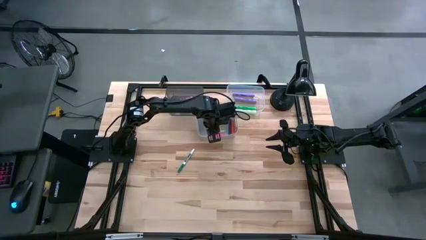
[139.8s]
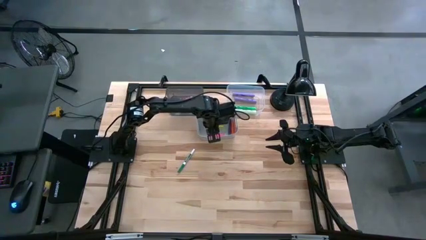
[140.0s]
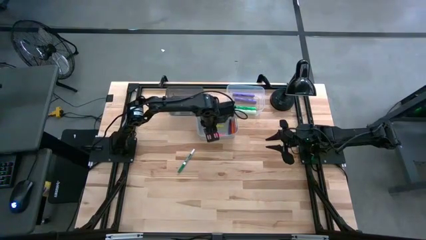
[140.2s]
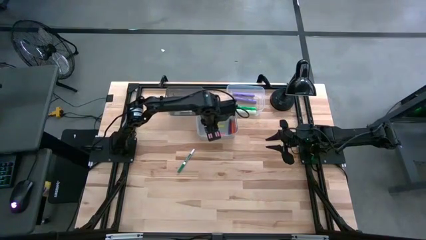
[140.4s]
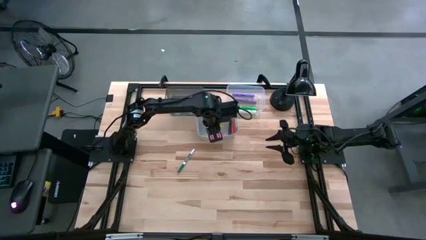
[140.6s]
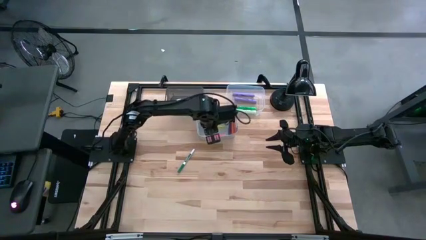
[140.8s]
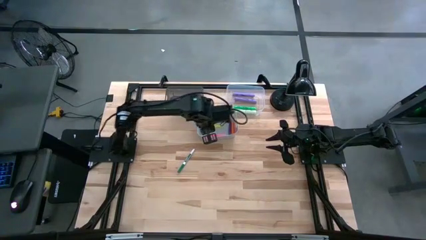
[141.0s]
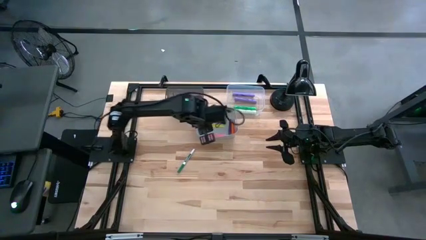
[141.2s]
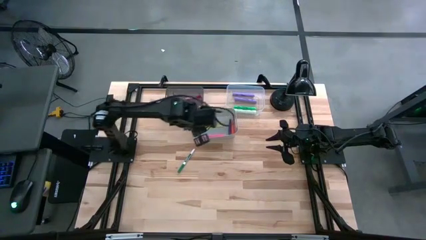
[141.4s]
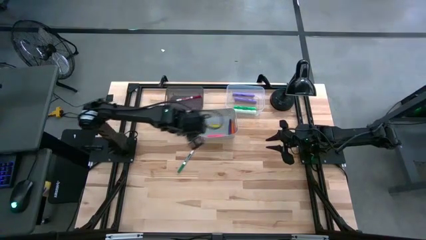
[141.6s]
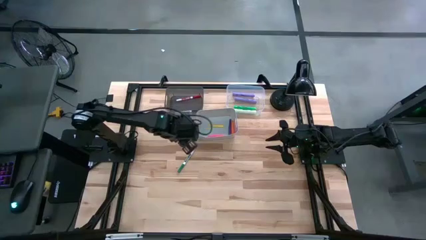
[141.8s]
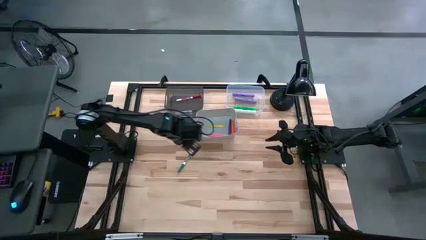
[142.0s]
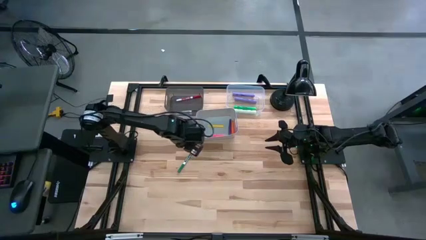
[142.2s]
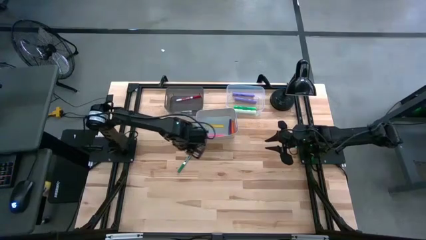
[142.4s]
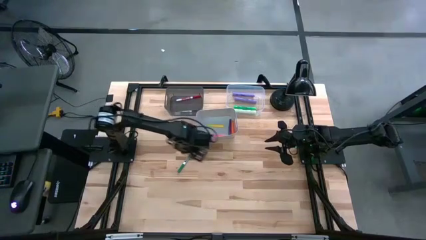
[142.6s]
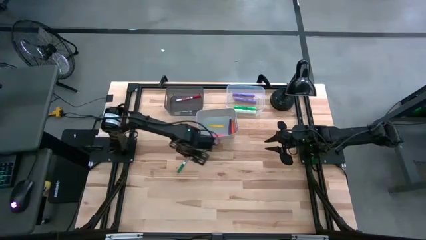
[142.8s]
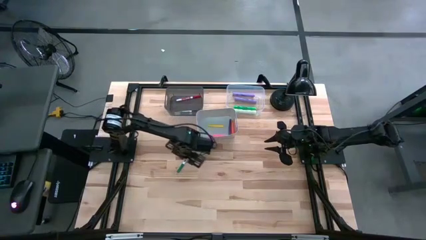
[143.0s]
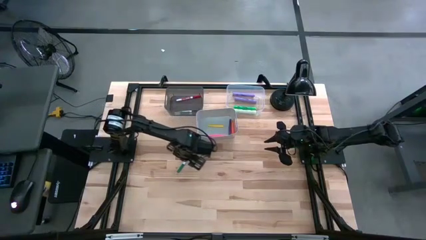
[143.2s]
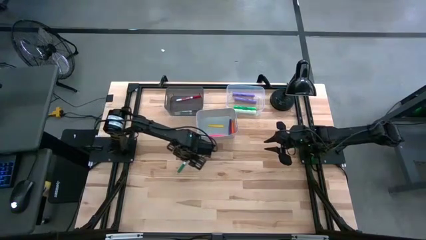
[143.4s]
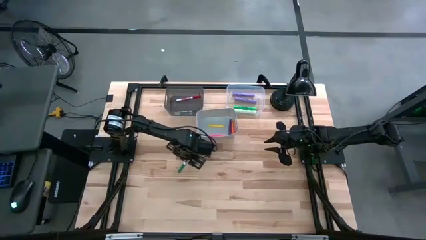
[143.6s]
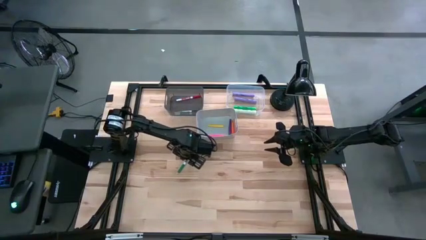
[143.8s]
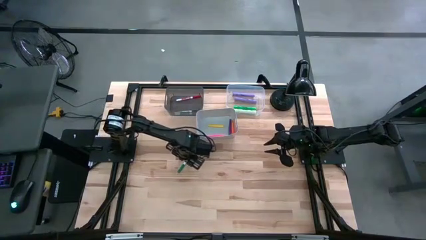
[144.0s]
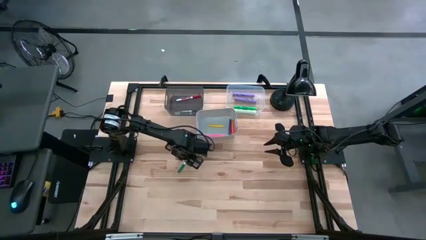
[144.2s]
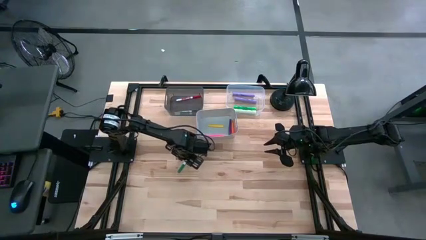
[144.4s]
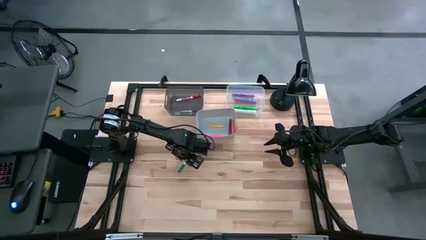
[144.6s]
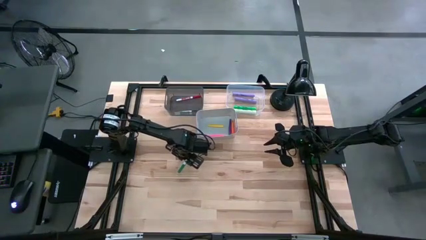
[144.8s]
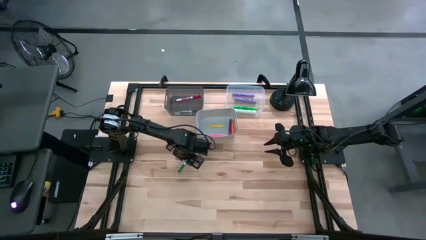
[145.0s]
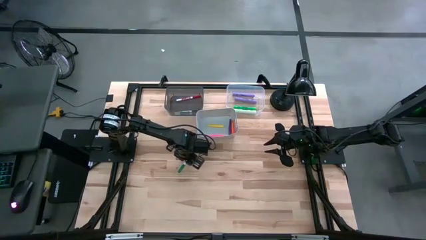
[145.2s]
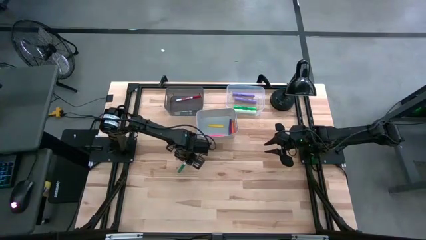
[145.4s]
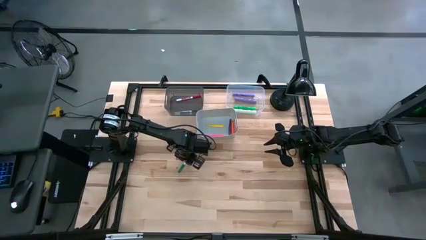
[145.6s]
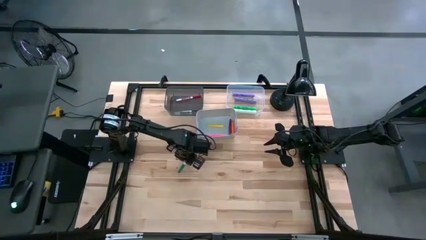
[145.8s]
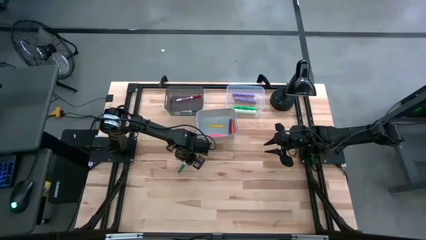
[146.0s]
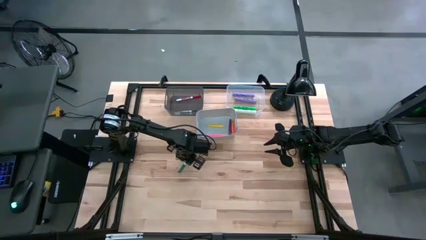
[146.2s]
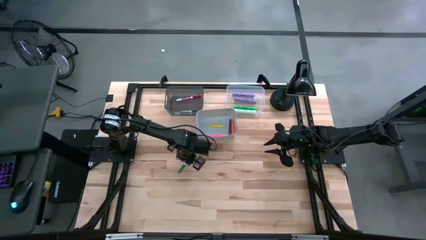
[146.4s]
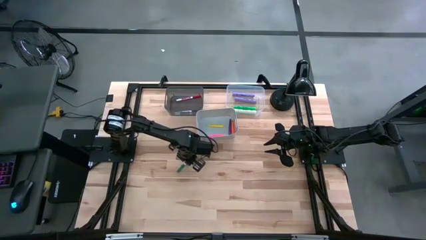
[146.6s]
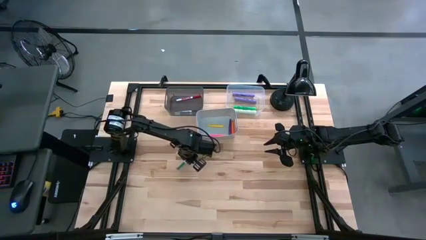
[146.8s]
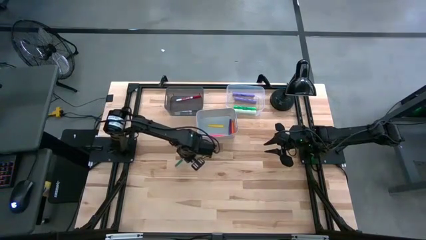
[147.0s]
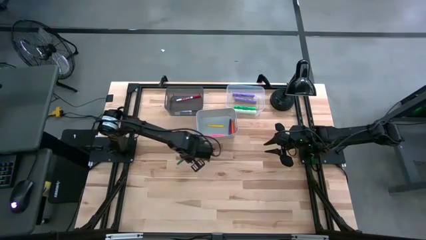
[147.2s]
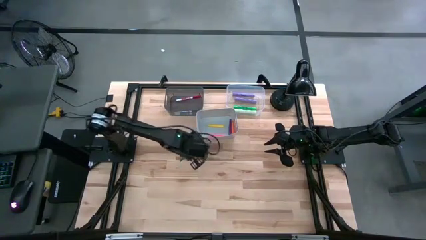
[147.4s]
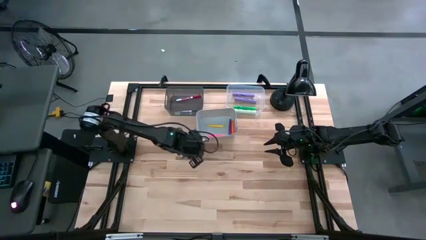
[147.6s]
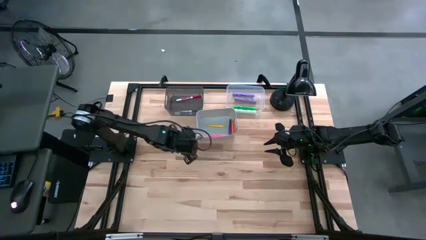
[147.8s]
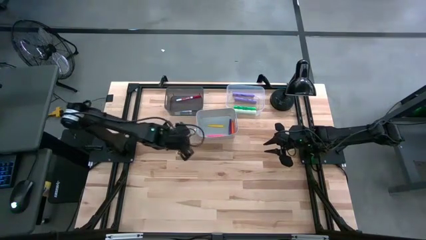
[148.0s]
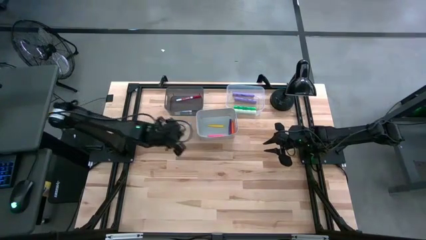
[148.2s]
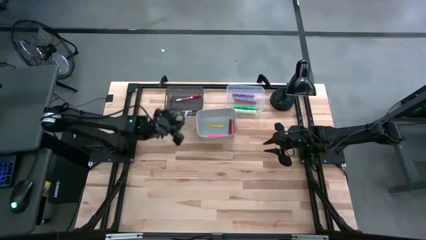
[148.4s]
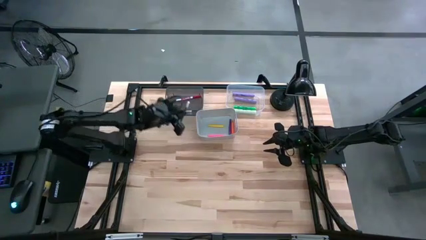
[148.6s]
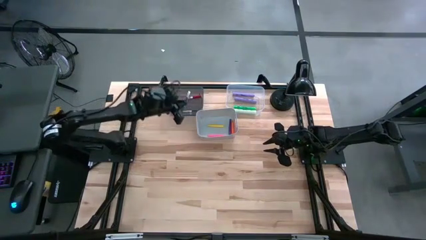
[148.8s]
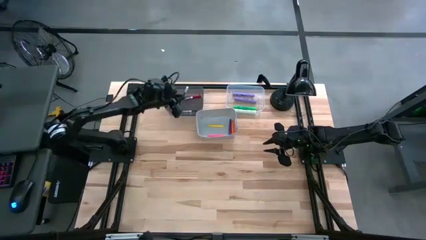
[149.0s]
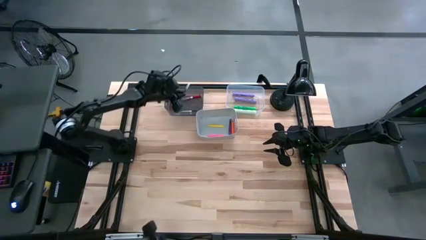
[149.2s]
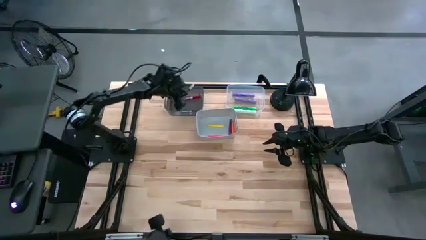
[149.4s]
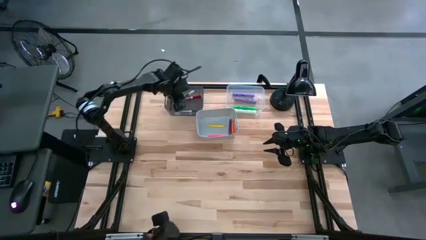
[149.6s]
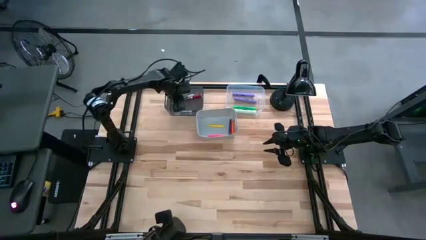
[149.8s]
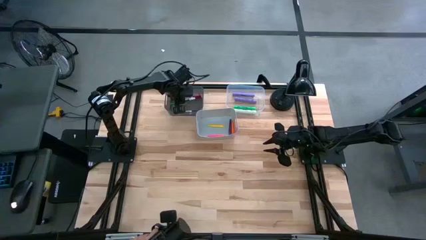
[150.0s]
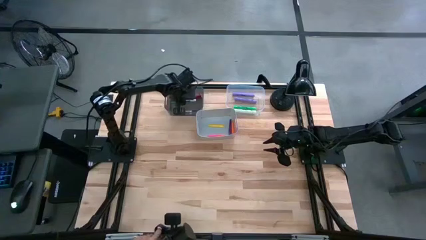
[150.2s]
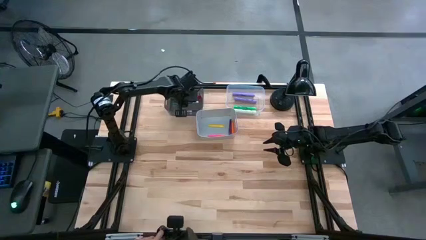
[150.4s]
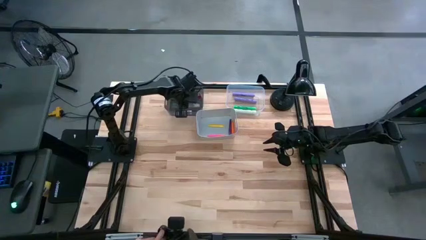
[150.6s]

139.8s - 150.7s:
Task: Pick & Place Markers
Put the green marker into the black bin

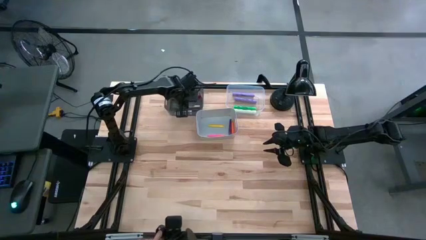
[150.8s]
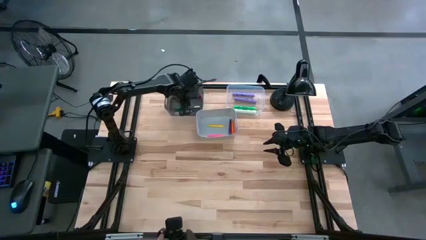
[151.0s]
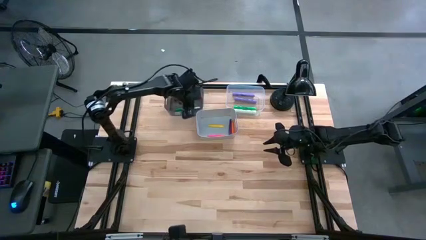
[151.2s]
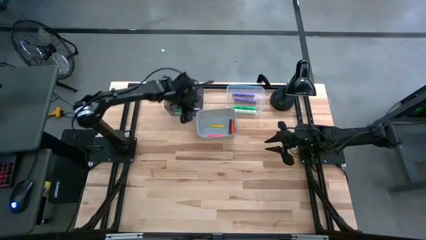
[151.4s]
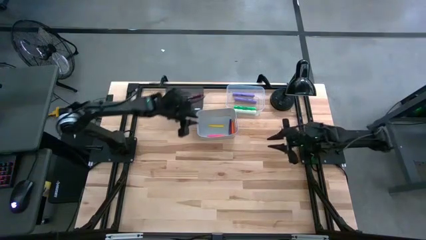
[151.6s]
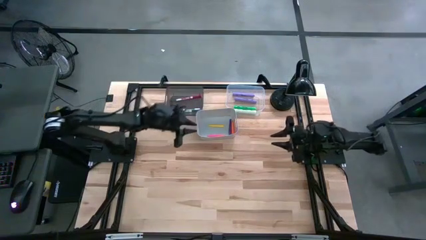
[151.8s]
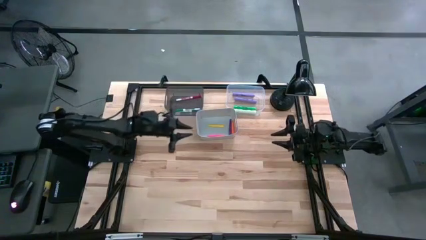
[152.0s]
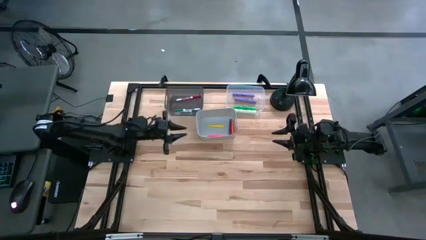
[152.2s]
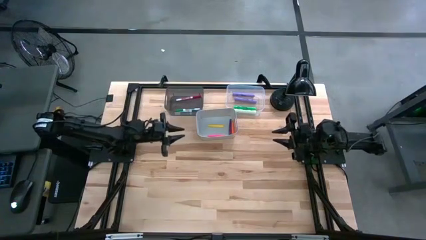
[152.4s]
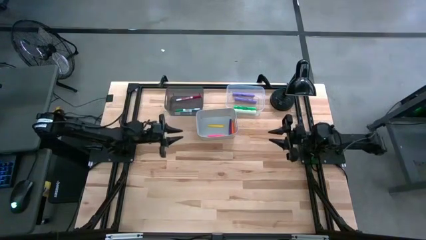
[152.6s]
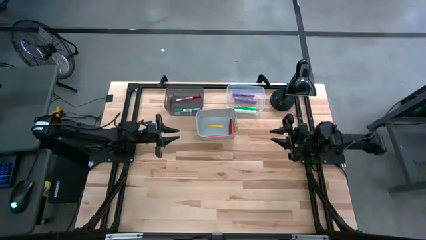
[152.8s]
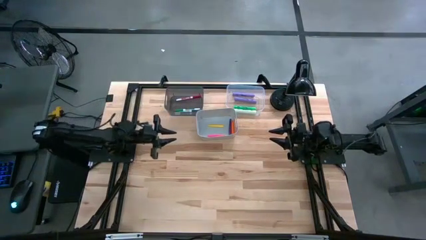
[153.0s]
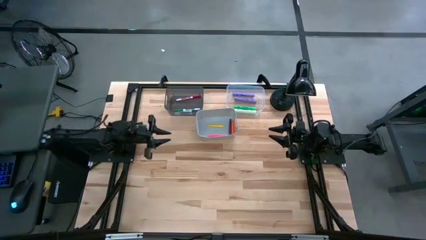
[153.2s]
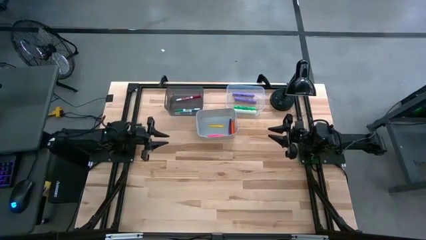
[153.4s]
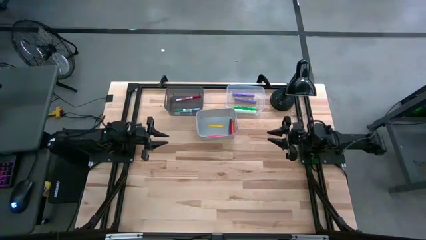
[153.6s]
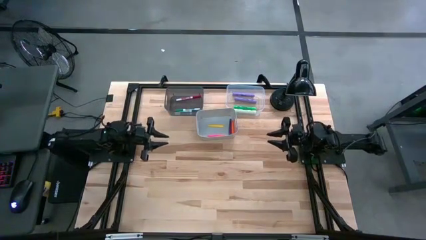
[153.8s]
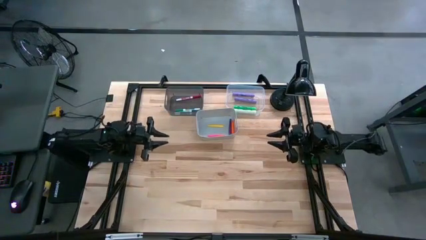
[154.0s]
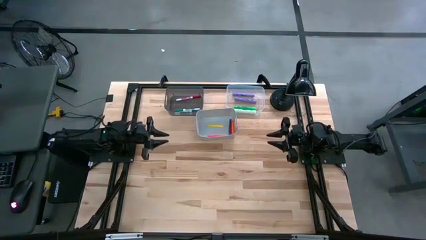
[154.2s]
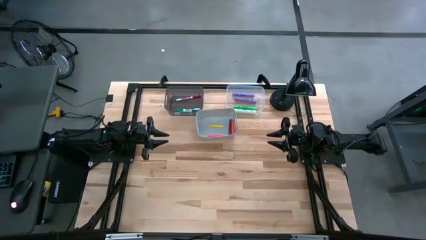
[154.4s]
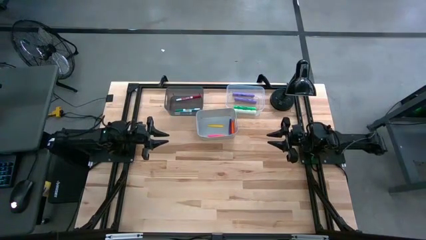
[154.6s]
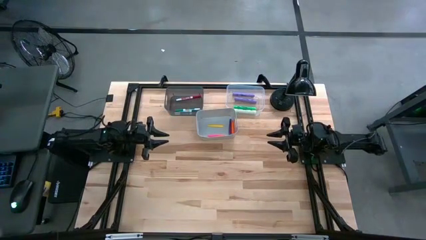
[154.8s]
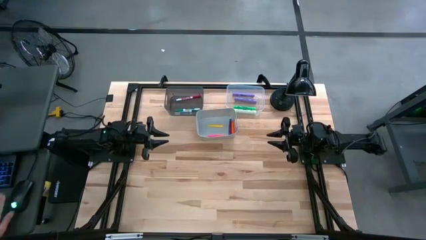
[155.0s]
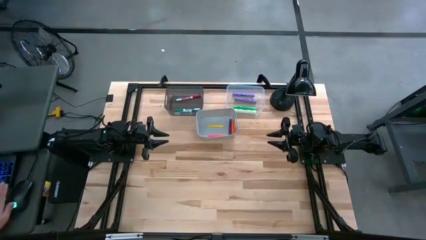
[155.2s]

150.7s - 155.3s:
Return to Home Position

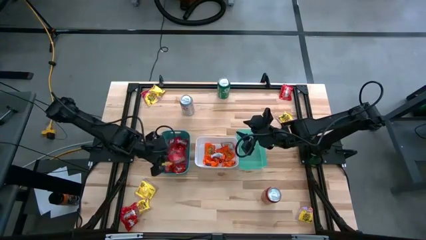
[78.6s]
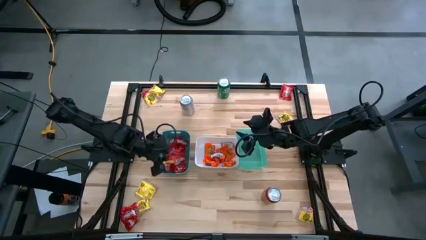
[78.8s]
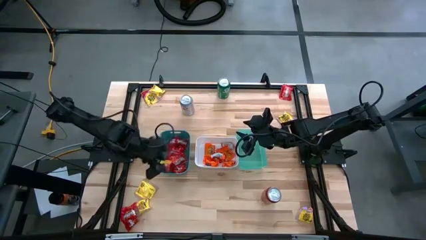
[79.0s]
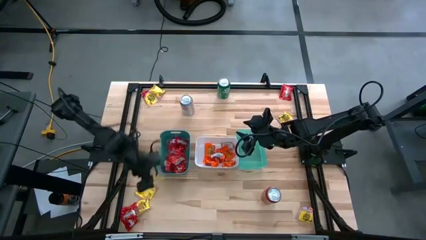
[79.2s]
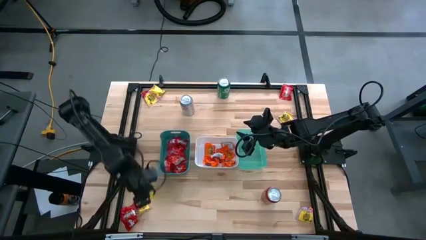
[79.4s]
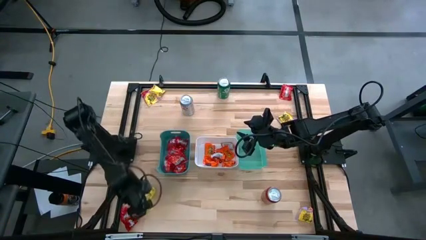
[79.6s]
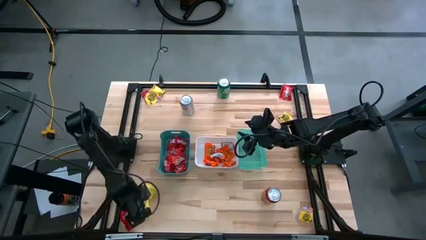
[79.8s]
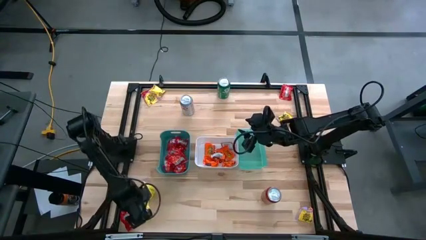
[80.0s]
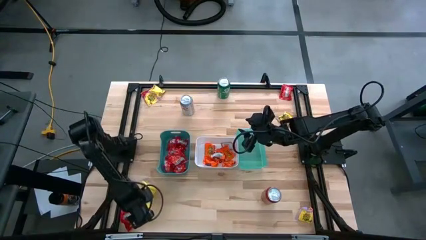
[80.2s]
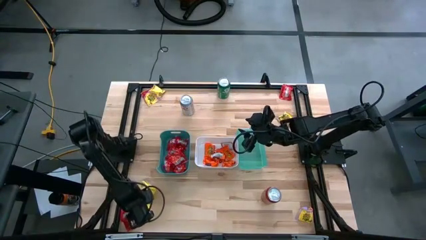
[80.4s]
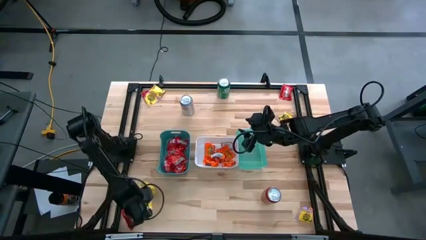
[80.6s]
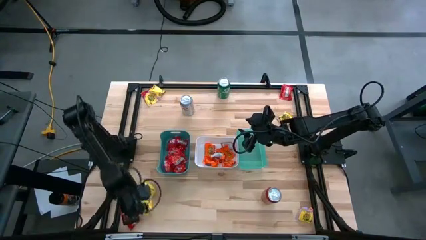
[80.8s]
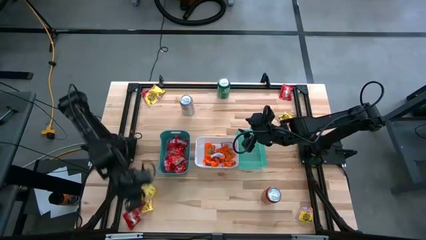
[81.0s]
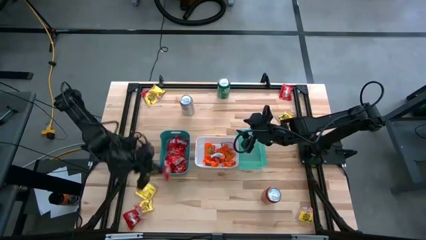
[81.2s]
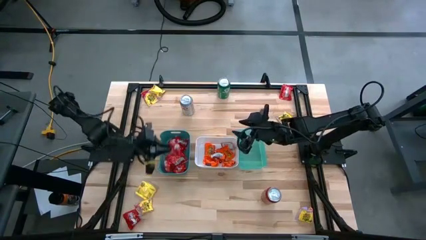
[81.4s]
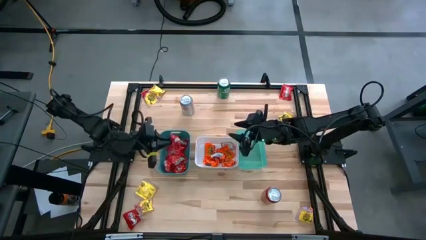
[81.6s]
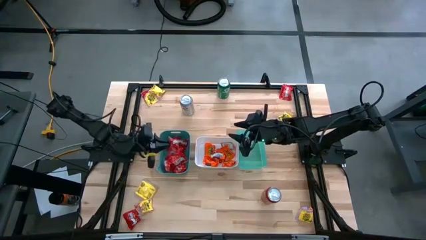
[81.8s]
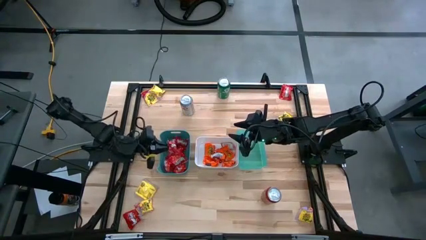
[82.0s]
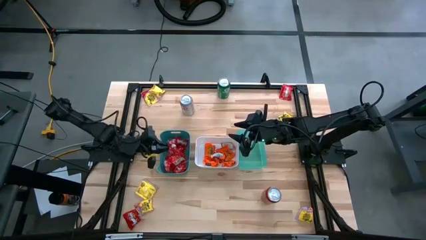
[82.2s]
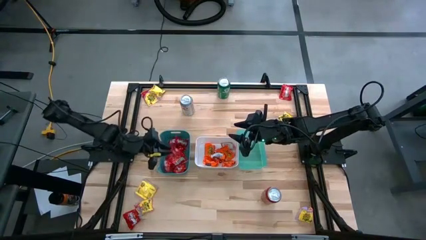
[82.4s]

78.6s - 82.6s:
Task: Sort candy
Put the red candy into the green bin
